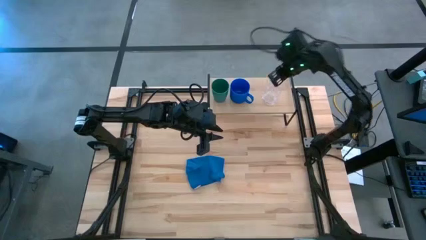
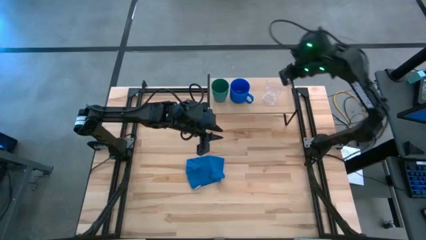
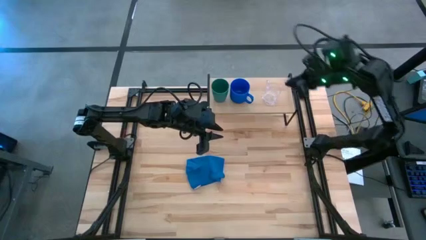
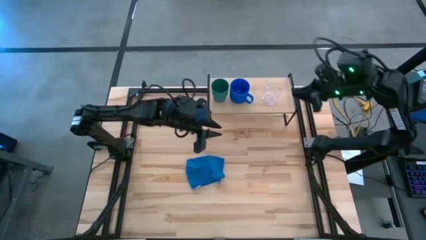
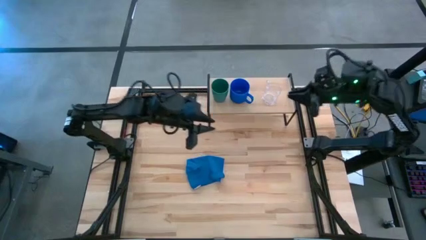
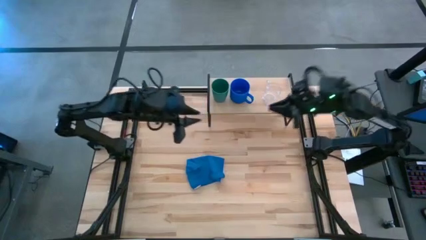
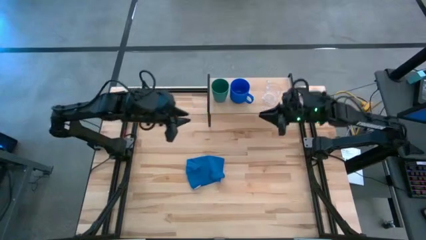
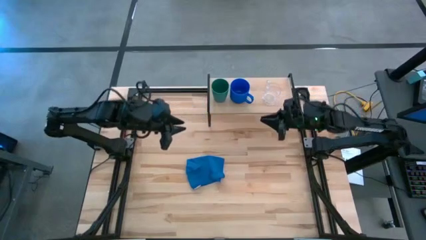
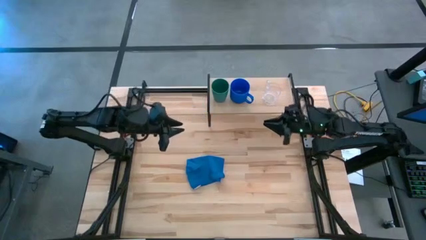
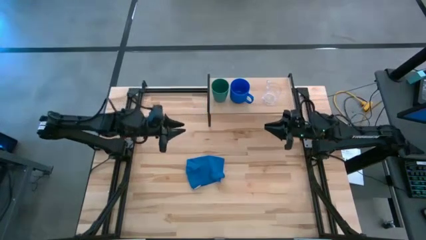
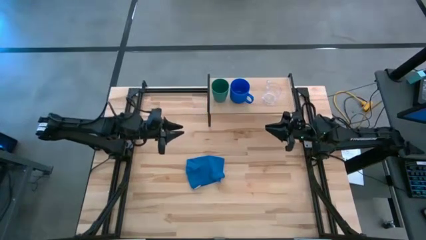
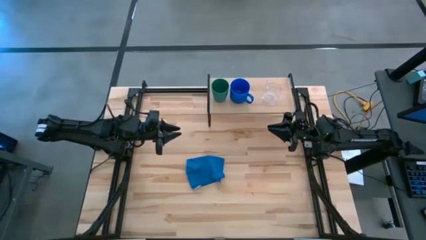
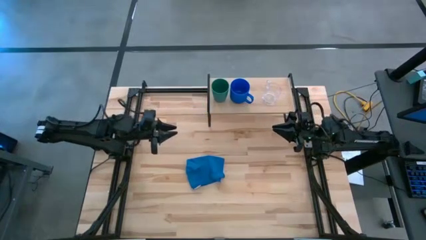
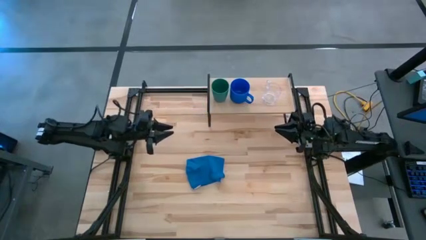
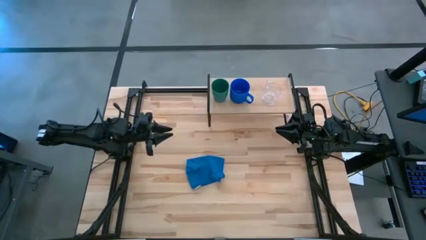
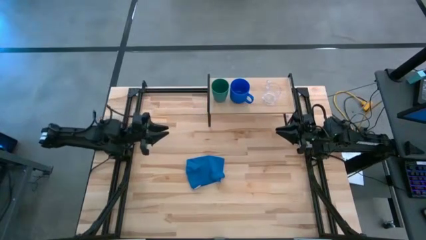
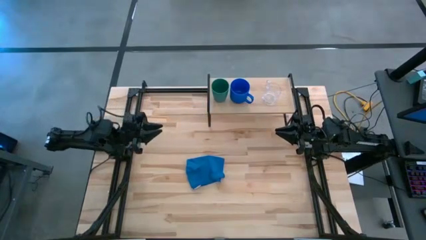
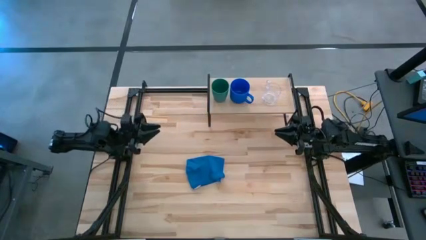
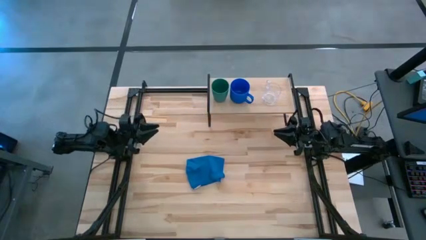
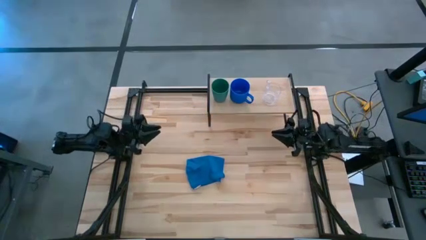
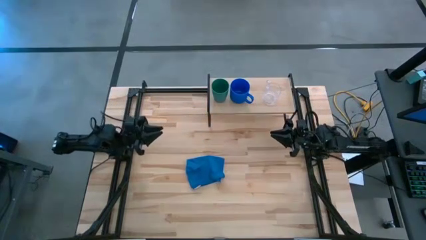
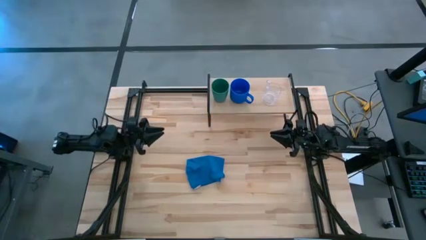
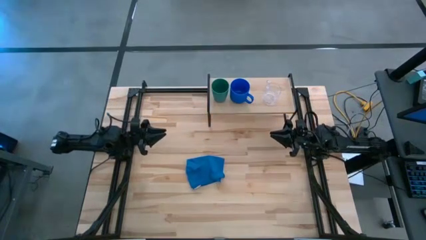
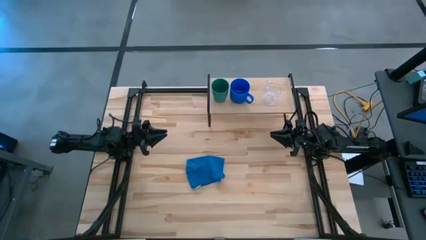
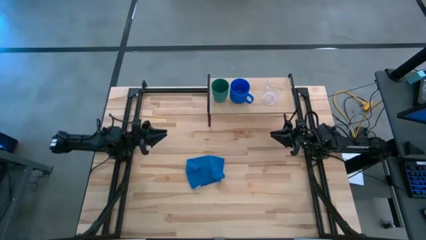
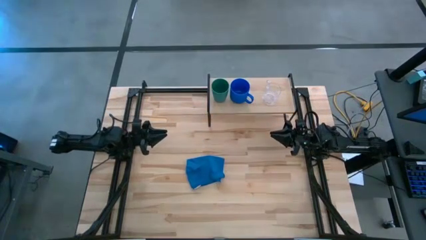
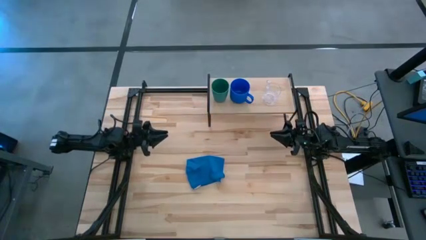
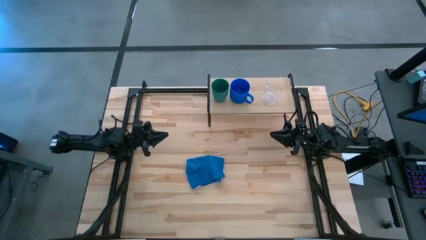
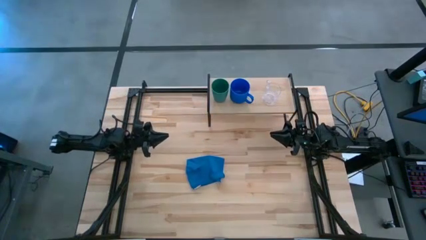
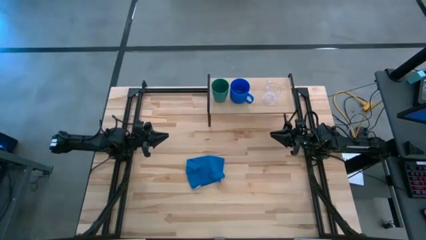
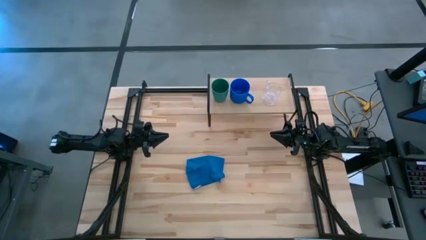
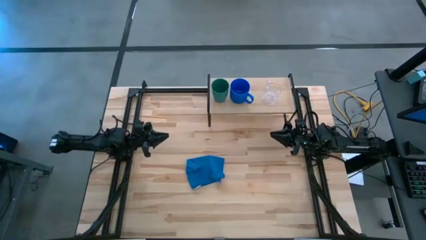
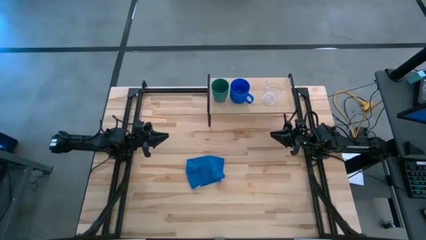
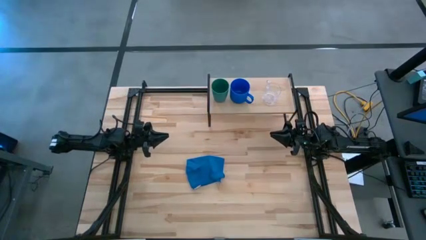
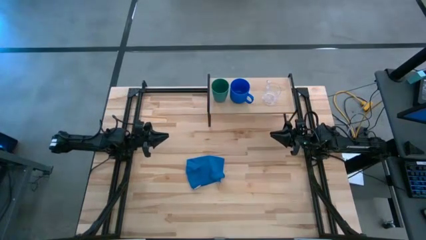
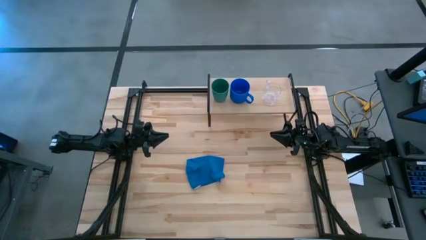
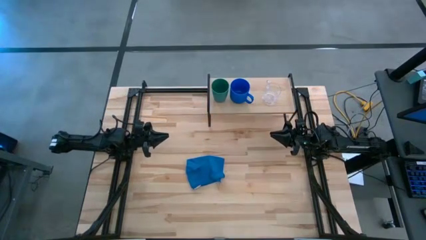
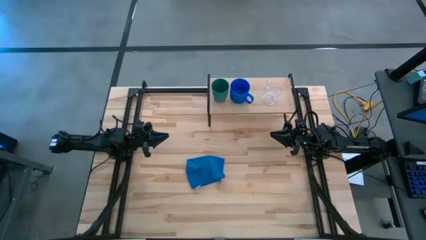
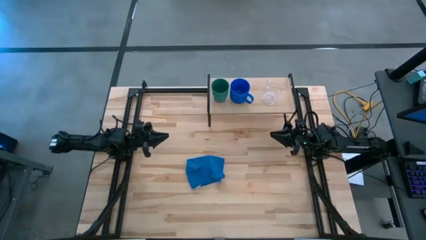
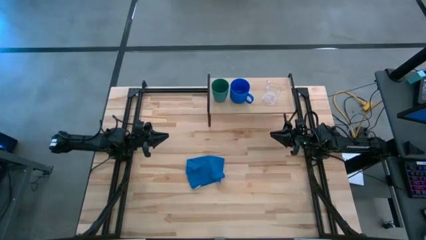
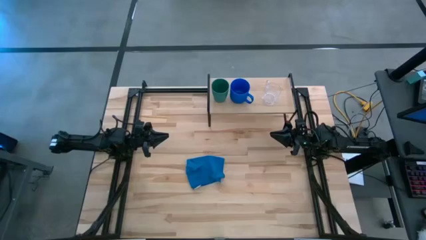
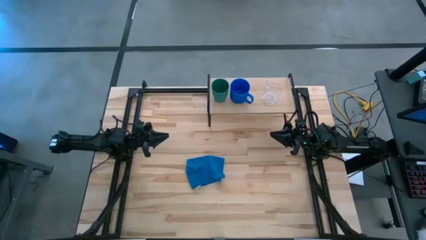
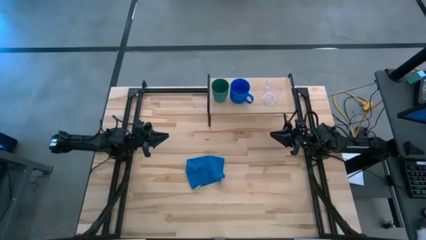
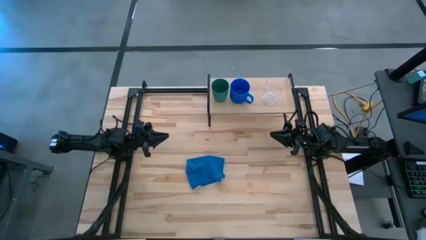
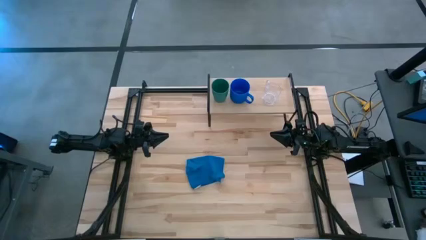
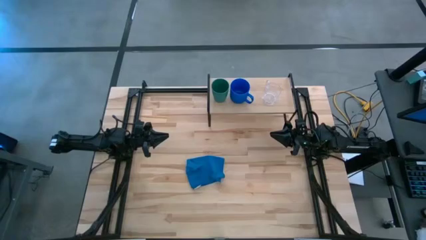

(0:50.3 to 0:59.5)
Task: Stack small to large cups/mugs on shelf
Return to Home Position

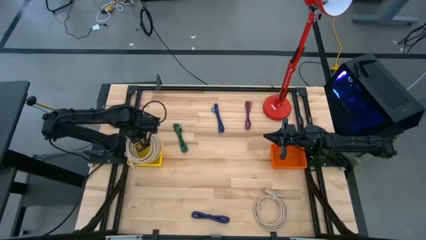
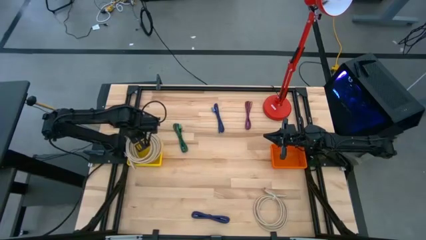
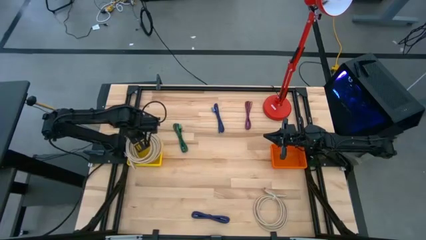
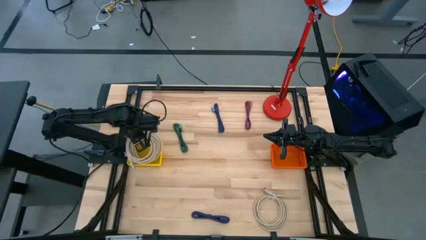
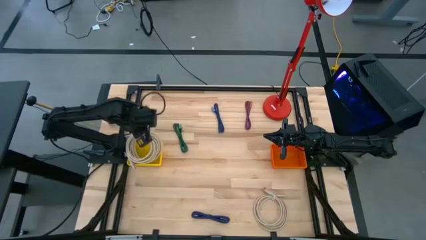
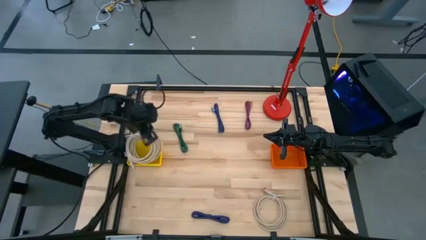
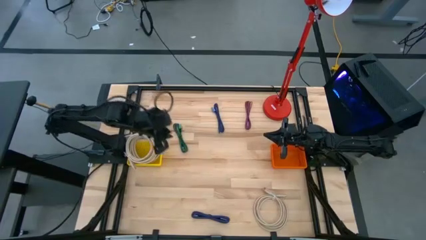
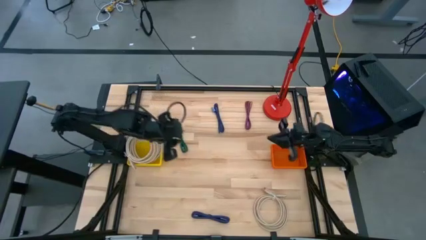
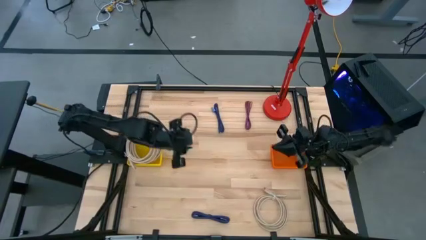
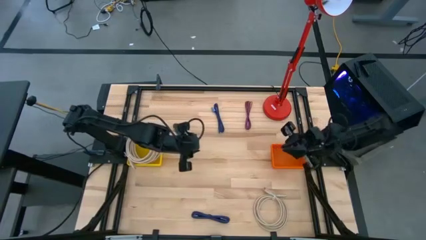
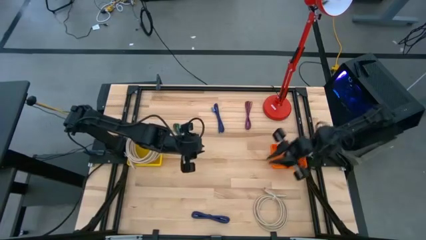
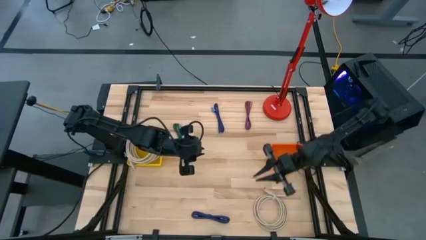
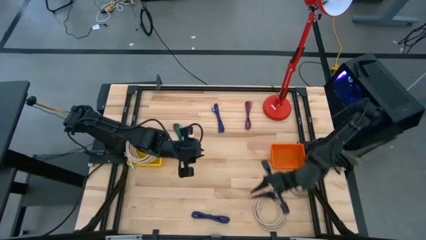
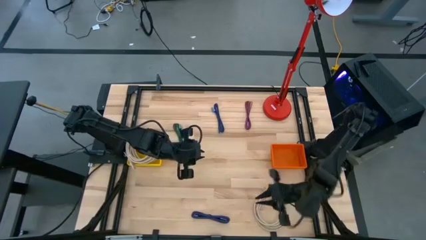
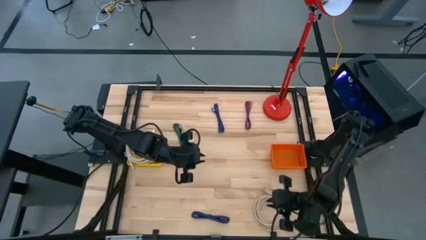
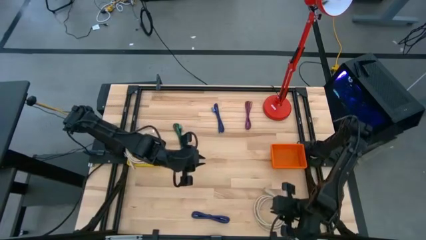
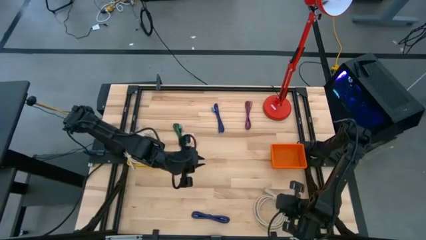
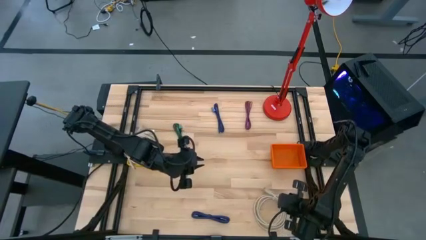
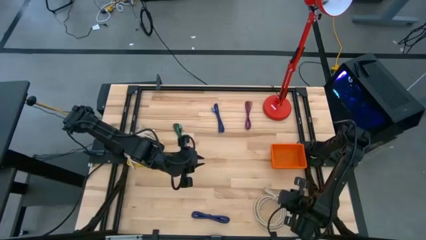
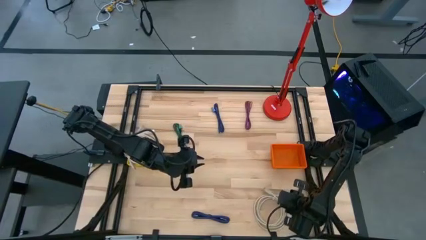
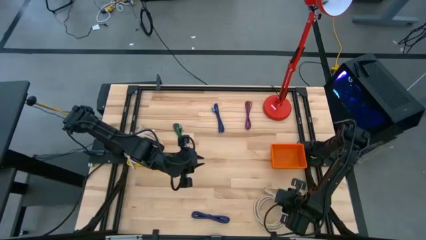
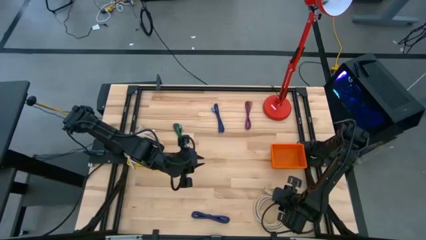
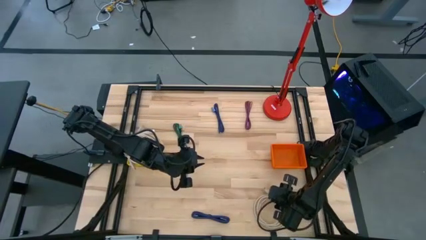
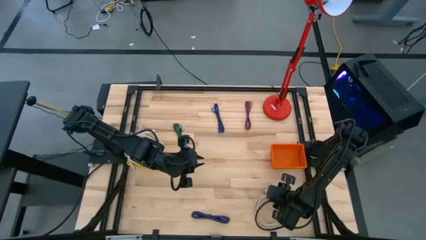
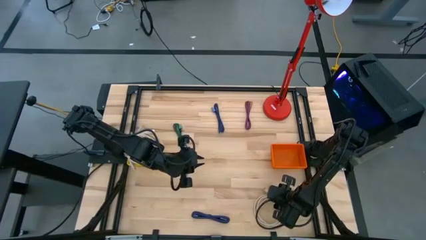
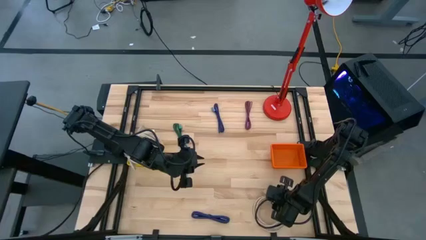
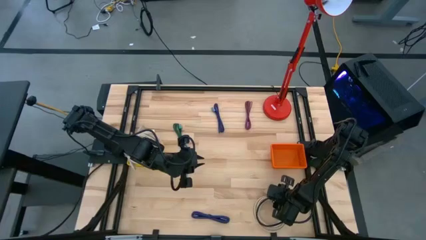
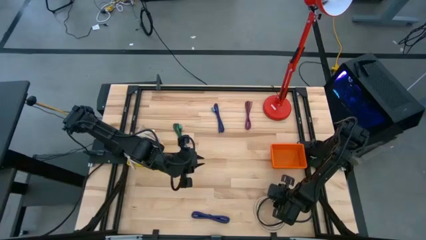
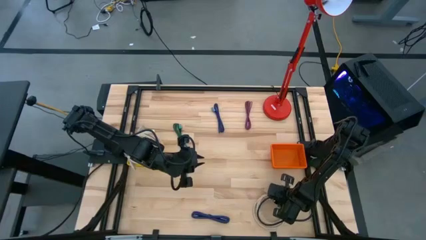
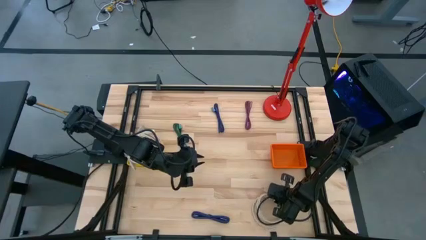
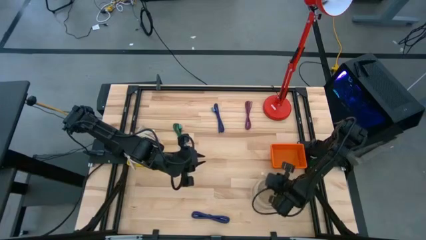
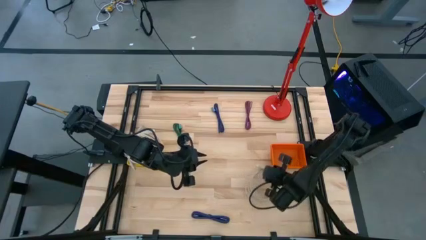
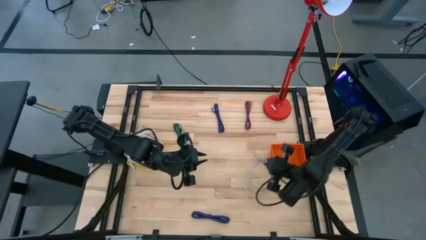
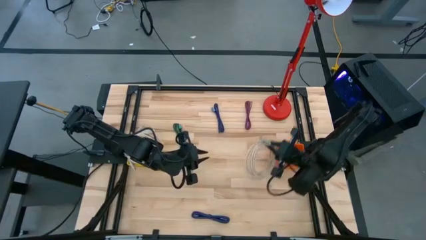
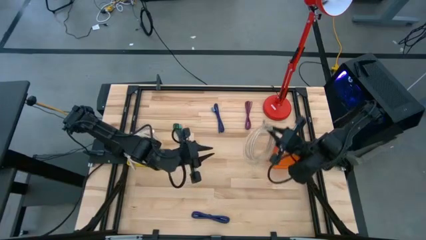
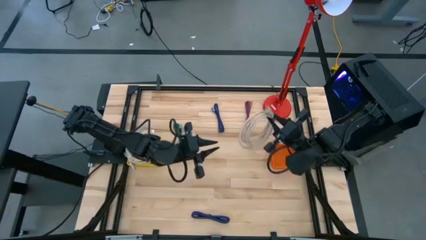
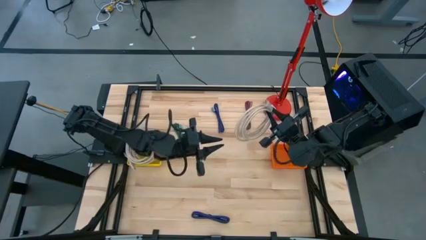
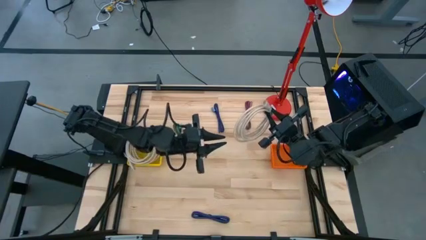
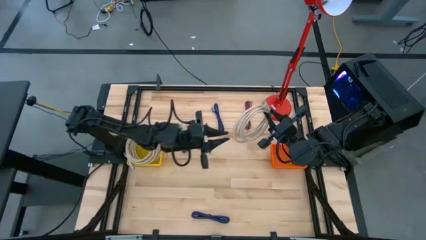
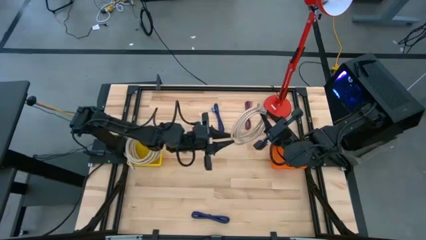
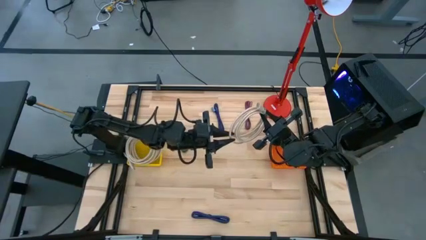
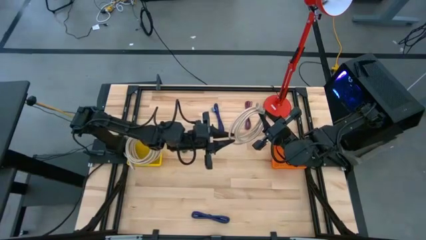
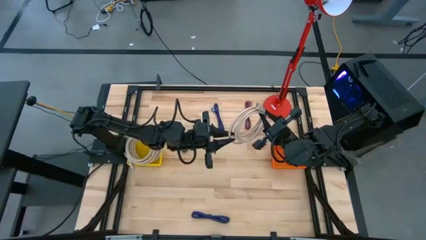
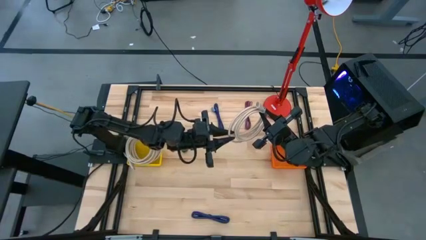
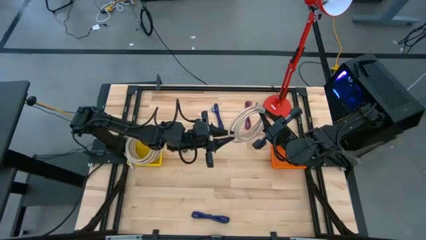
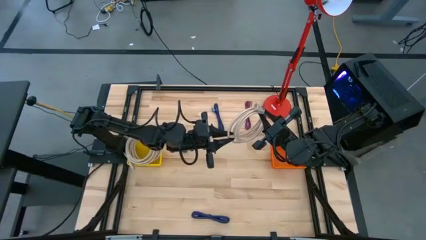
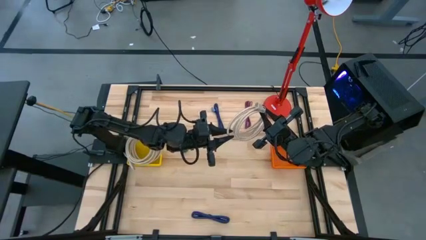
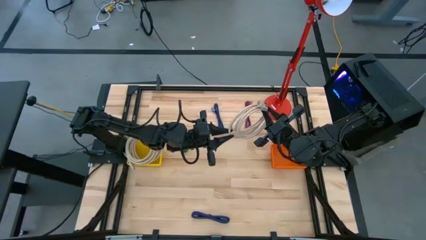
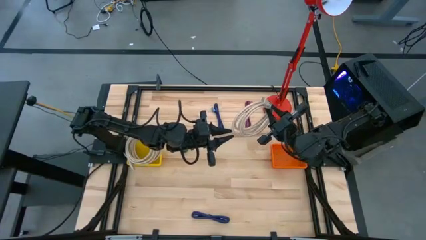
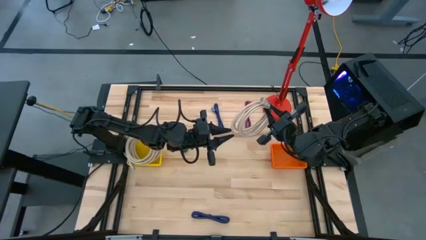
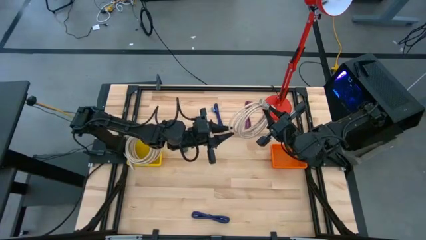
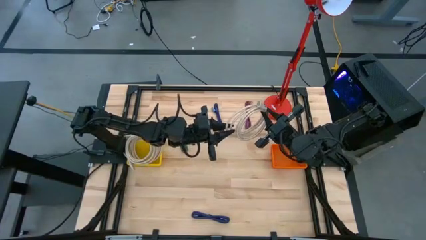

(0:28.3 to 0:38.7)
Task: Pick & Place USB Port
Put the brown HDMI cable into the yellow basket
